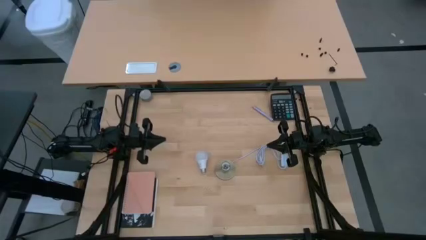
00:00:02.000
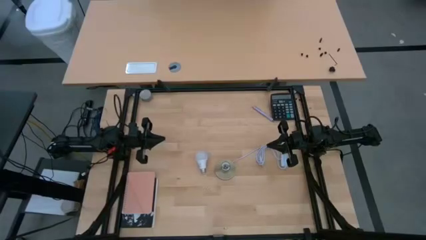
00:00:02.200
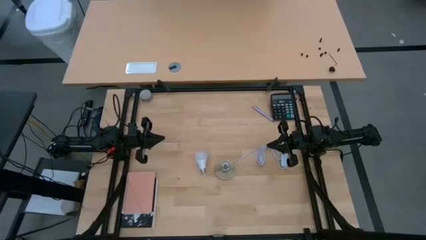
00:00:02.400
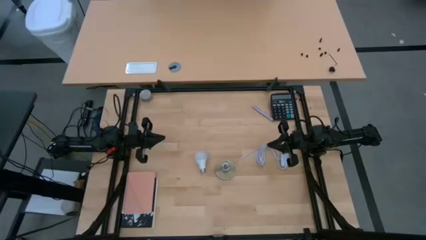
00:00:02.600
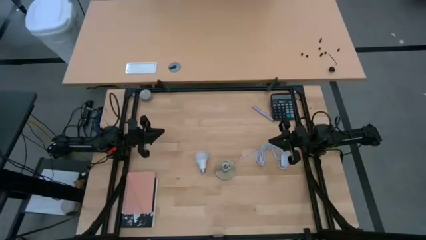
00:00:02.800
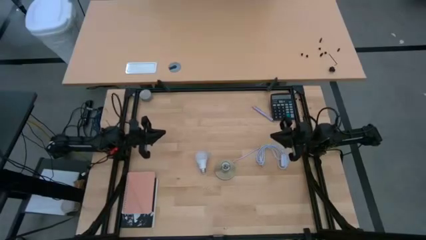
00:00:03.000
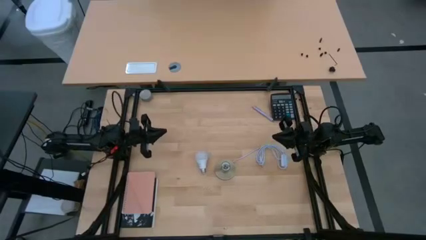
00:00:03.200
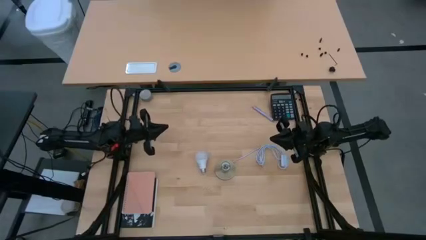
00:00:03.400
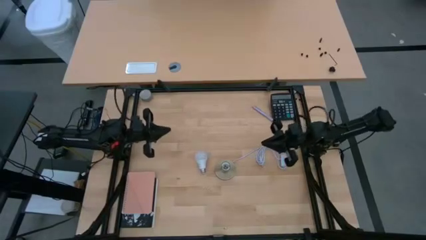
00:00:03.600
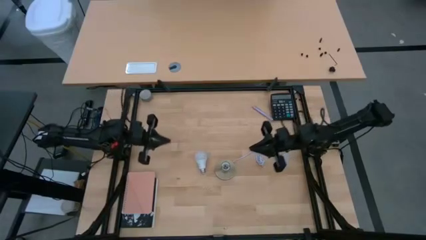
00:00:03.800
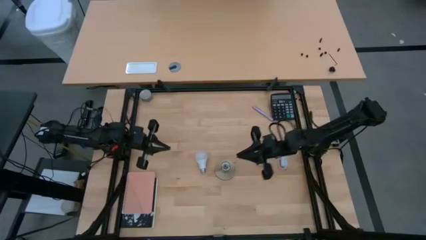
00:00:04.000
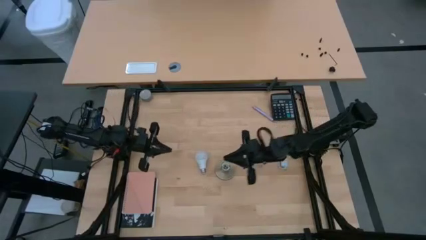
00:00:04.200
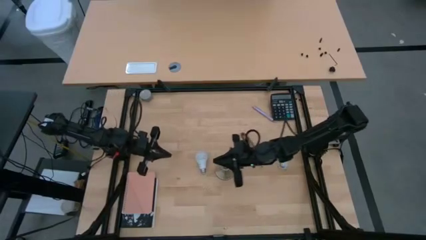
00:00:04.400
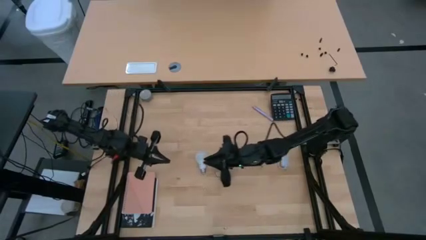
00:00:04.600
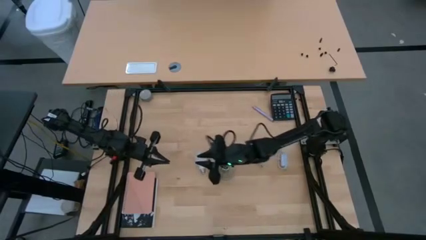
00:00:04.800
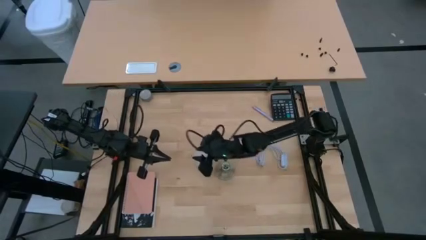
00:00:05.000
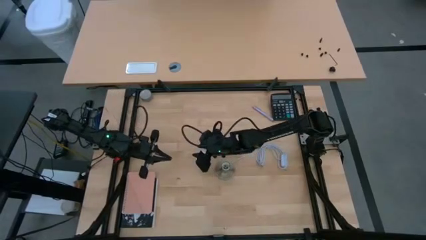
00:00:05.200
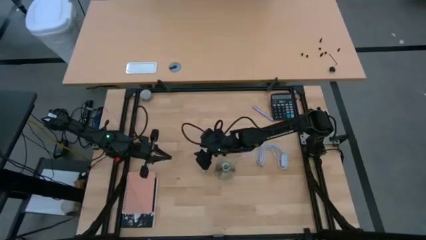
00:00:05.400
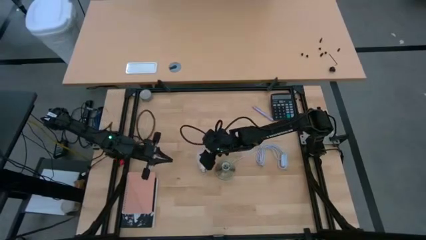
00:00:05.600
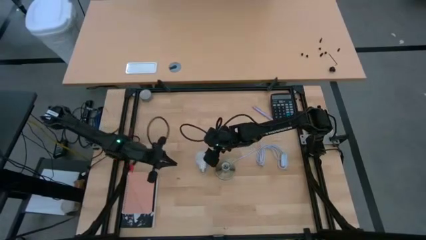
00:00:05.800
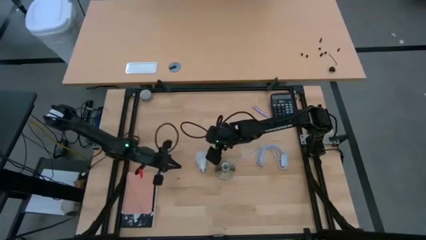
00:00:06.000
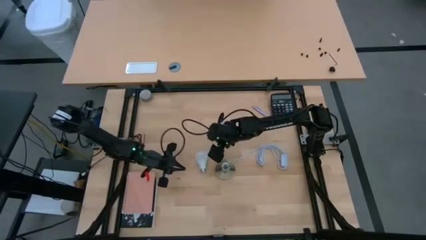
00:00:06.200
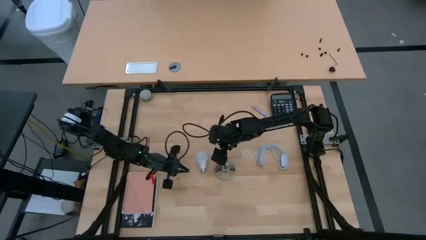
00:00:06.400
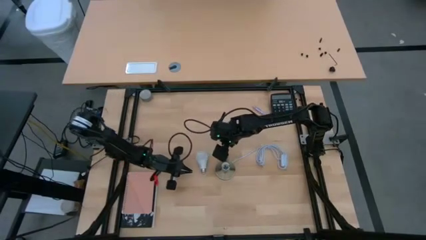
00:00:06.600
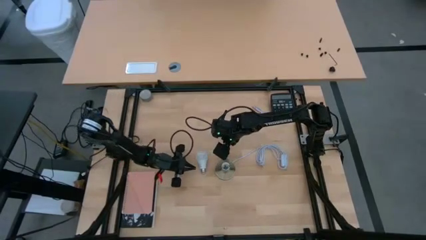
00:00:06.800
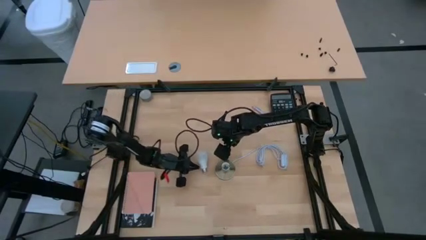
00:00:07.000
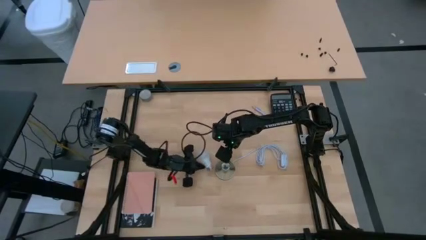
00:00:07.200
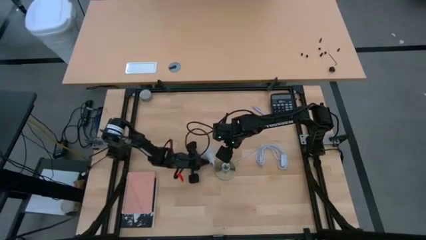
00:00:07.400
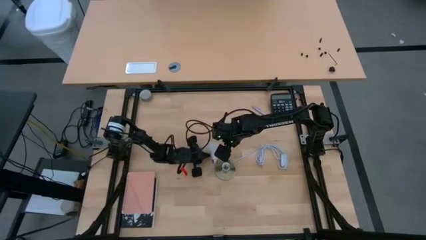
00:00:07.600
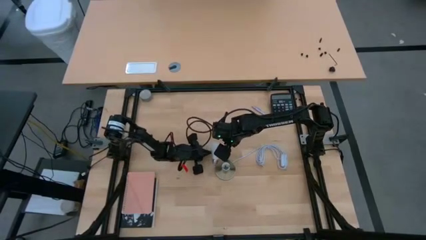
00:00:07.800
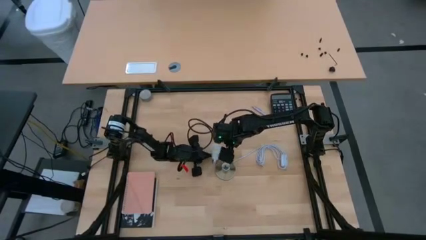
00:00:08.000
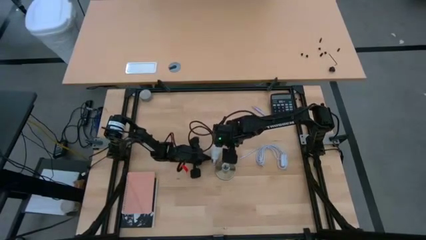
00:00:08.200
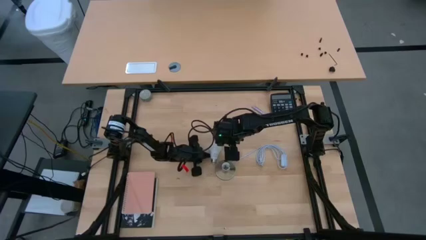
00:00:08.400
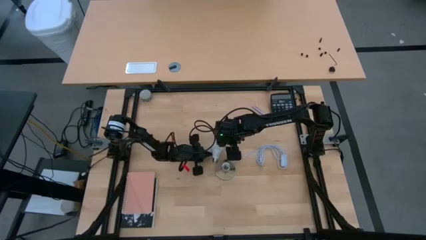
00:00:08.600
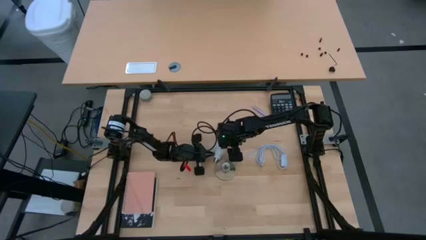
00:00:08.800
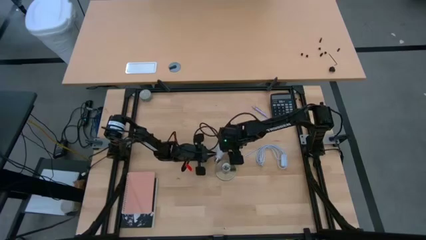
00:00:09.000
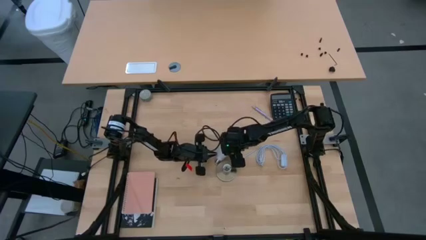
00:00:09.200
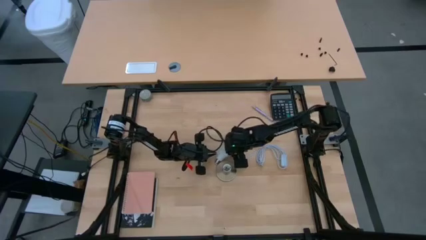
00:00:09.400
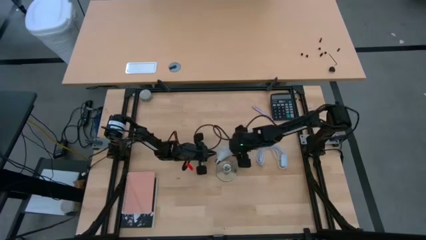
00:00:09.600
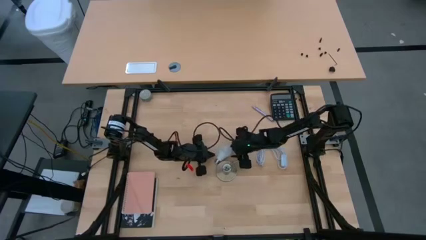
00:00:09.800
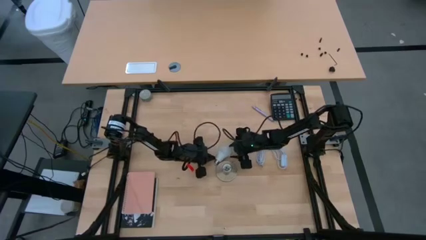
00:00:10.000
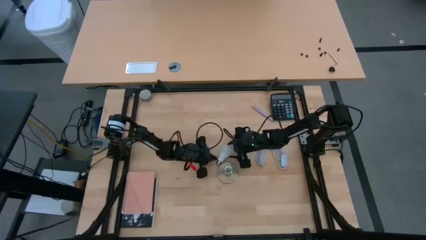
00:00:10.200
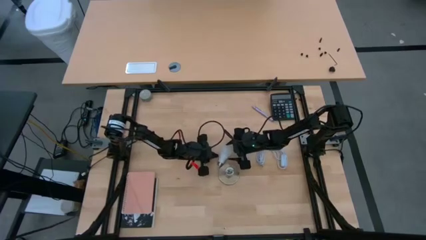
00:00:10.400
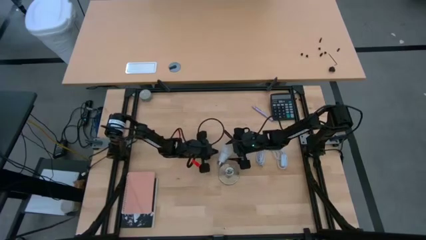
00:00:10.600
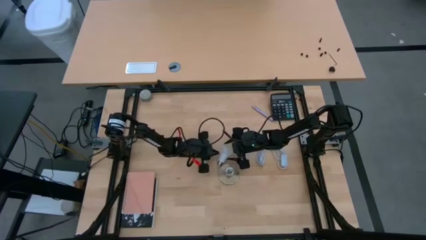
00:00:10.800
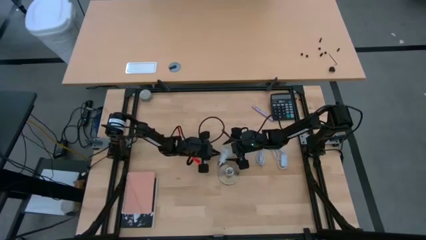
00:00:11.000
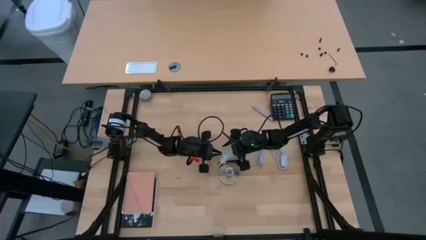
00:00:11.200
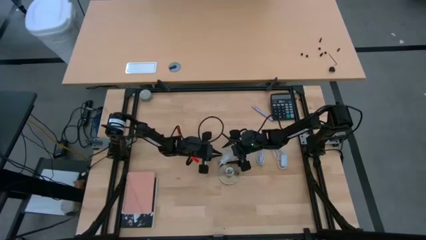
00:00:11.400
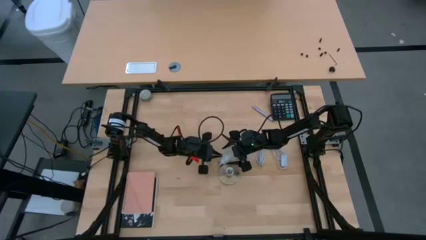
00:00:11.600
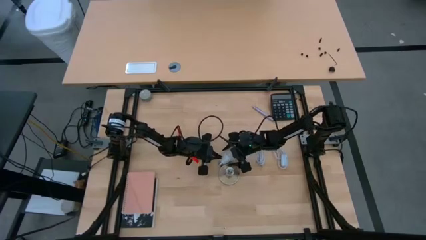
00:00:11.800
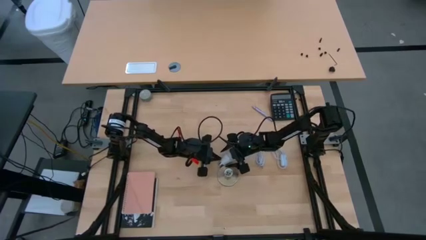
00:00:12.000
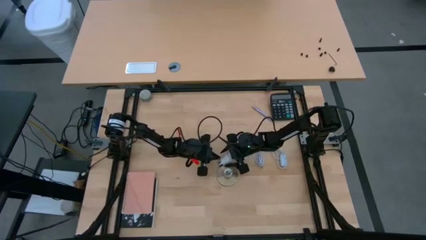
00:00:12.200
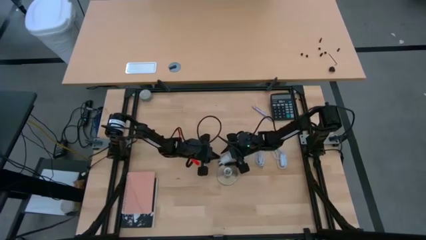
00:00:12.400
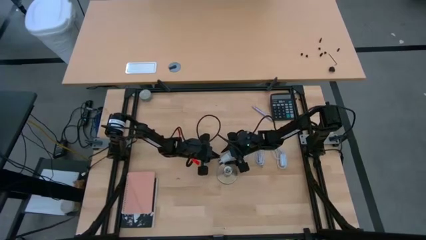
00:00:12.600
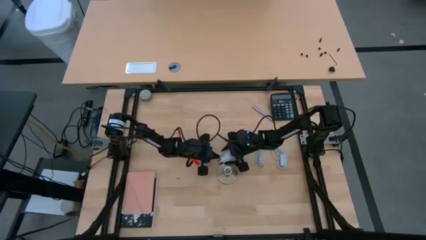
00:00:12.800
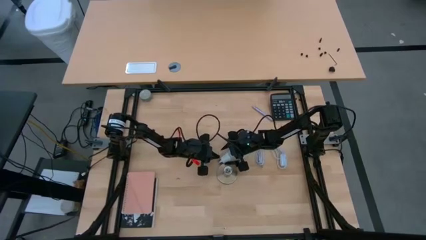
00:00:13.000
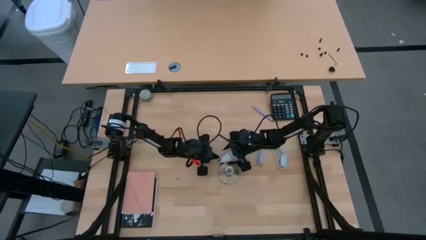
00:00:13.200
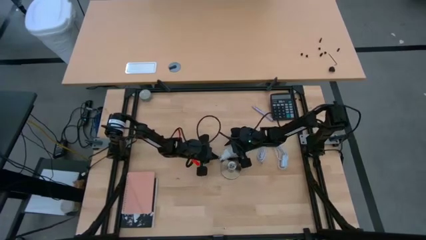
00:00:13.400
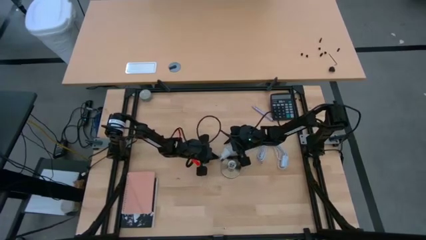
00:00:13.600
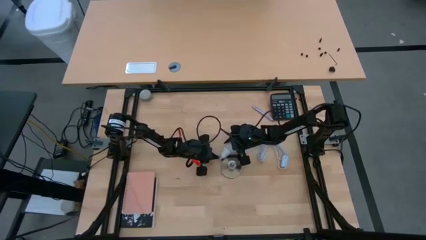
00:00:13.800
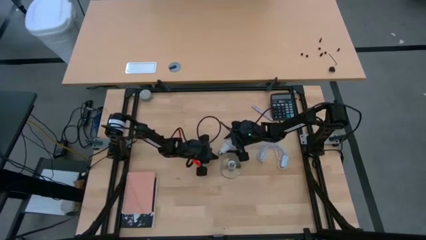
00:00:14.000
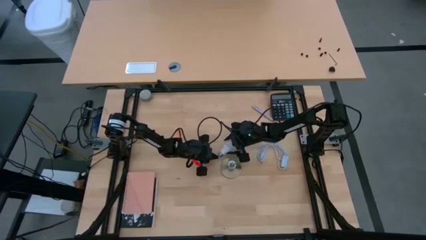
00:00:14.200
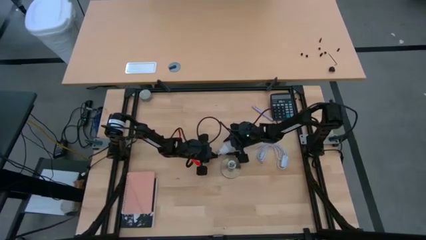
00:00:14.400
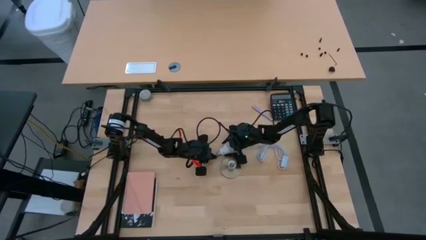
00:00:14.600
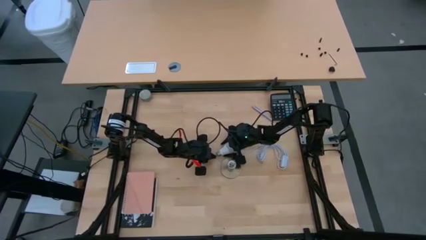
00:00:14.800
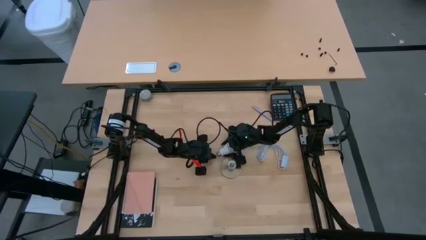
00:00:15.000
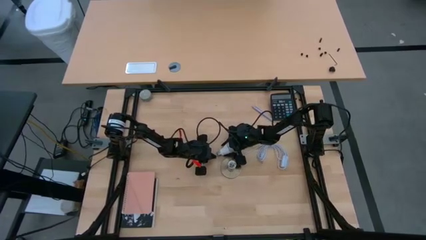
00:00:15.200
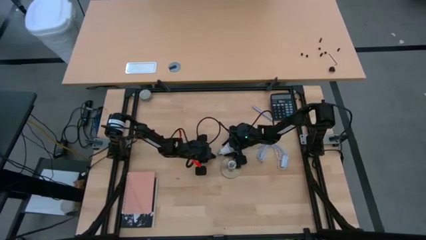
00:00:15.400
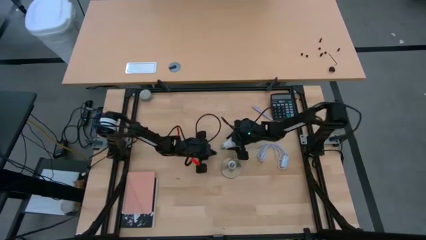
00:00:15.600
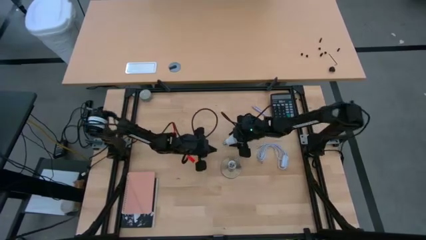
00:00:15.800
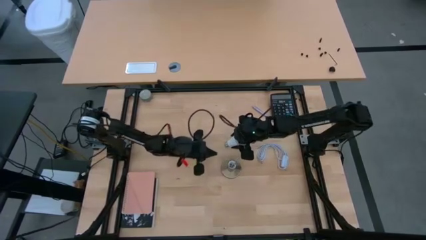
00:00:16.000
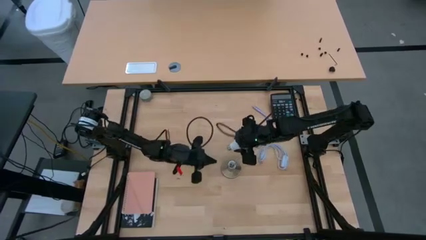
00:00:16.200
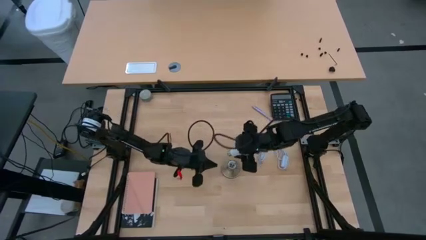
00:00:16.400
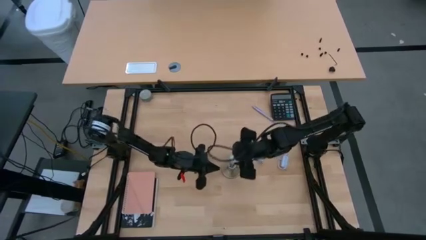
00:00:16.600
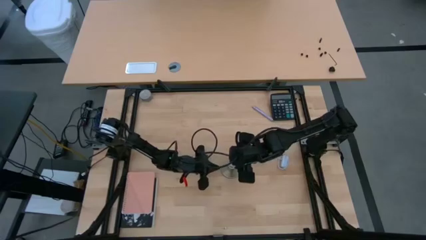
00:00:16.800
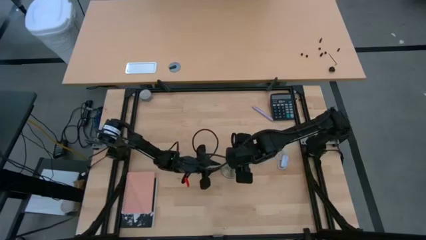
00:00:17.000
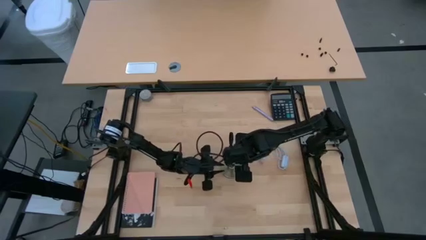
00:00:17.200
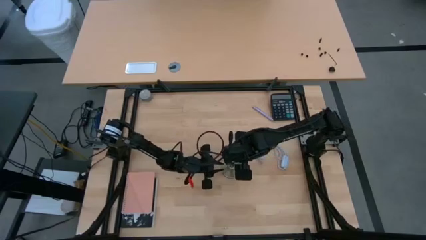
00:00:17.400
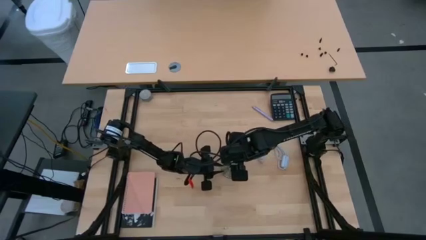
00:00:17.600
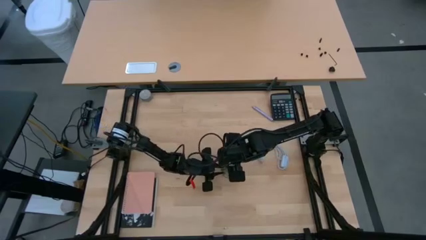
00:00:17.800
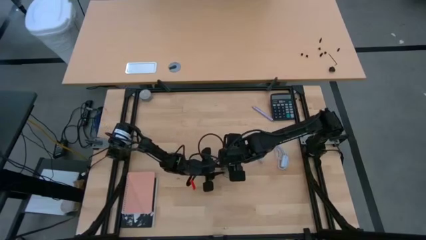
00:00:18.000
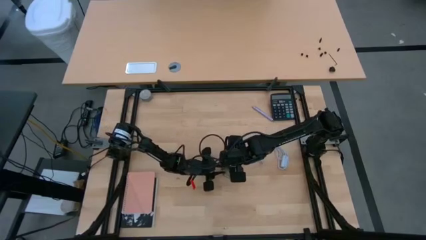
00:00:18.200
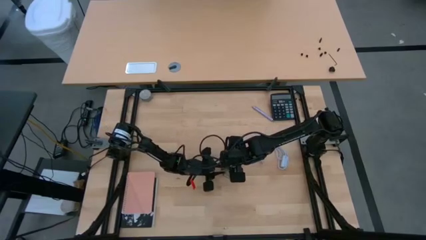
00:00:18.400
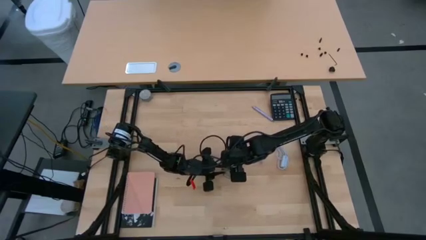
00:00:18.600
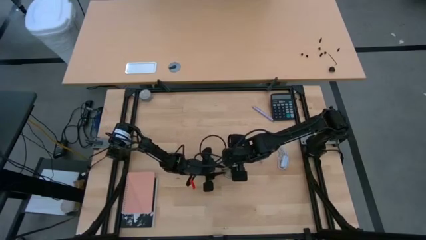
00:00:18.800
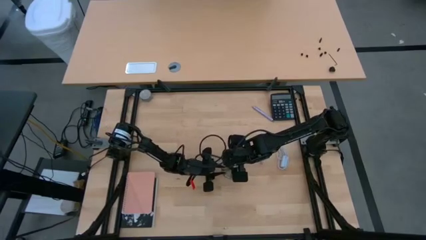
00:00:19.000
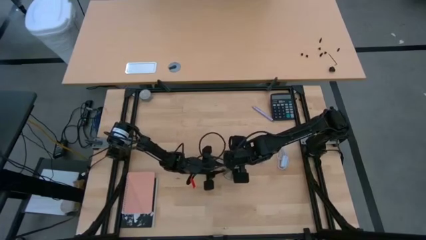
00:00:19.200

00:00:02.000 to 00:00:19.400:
Task: Screw lightbulb
Insert the lightbulb on the lamp
